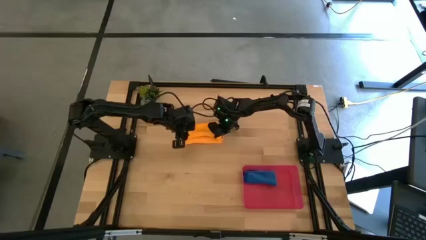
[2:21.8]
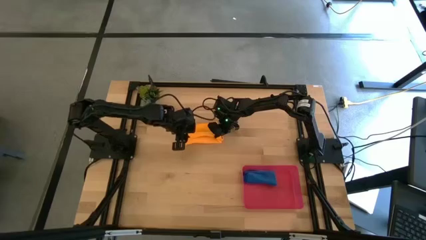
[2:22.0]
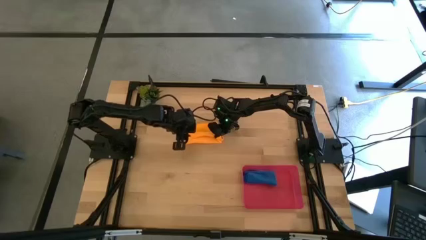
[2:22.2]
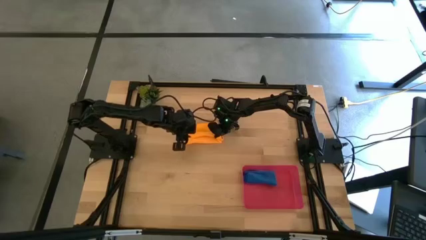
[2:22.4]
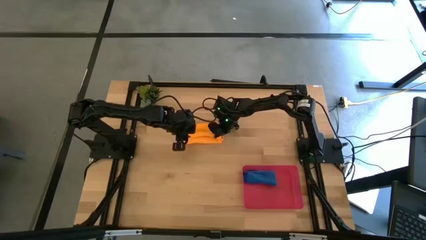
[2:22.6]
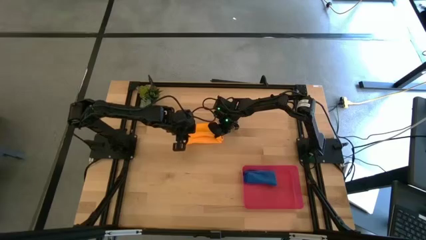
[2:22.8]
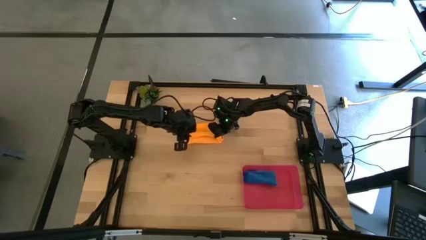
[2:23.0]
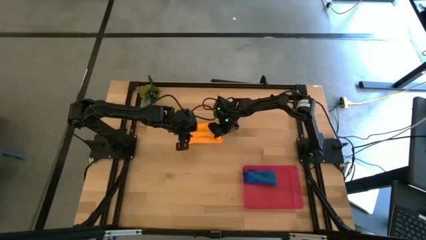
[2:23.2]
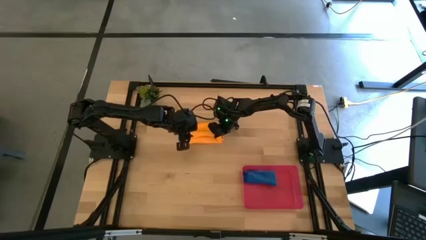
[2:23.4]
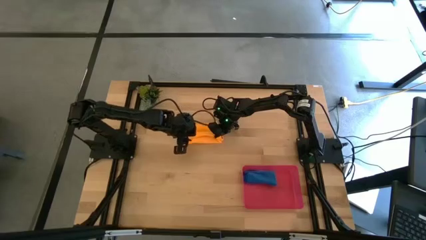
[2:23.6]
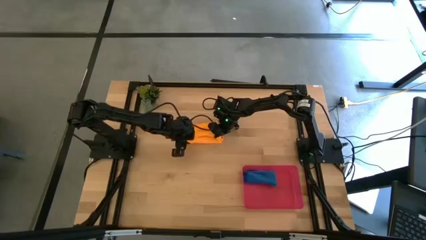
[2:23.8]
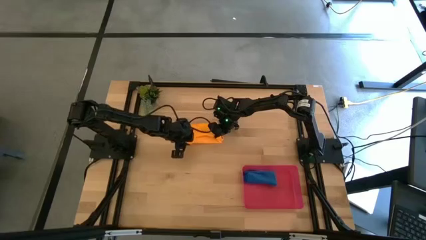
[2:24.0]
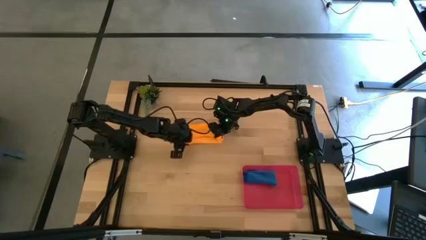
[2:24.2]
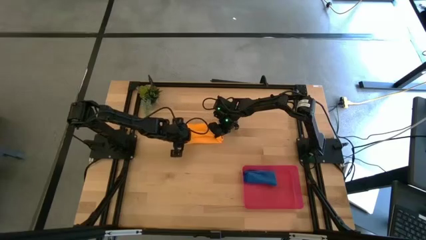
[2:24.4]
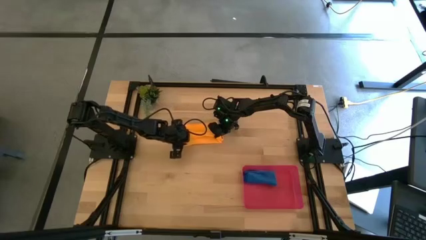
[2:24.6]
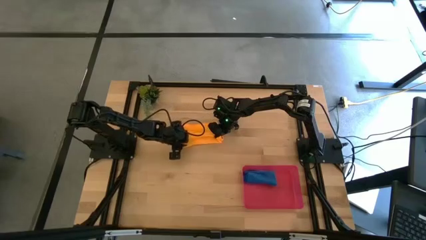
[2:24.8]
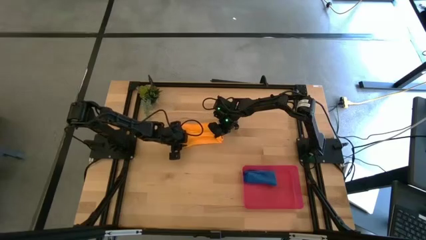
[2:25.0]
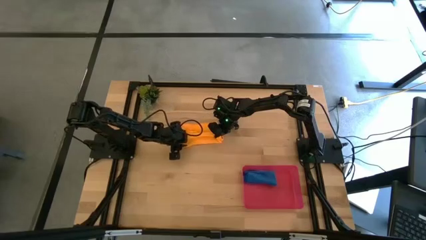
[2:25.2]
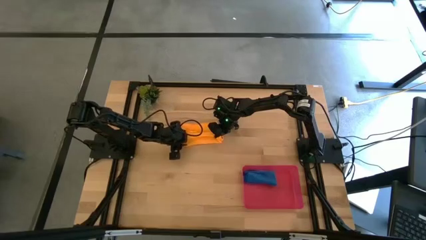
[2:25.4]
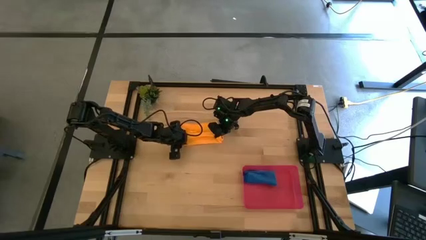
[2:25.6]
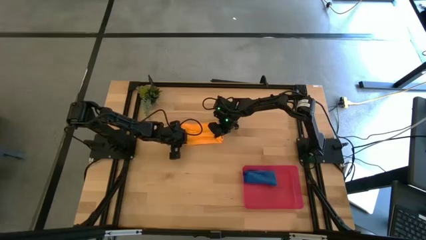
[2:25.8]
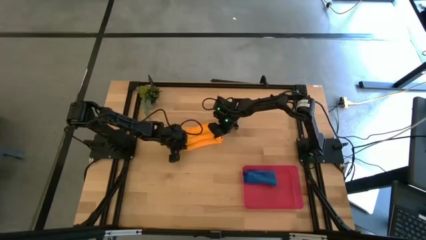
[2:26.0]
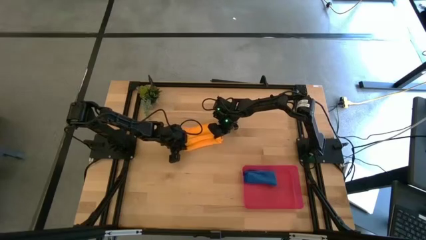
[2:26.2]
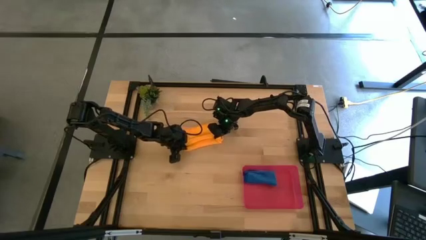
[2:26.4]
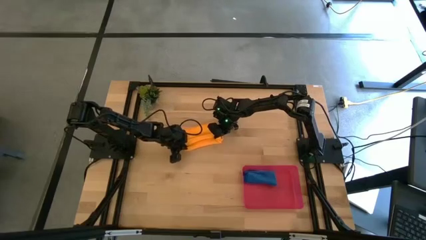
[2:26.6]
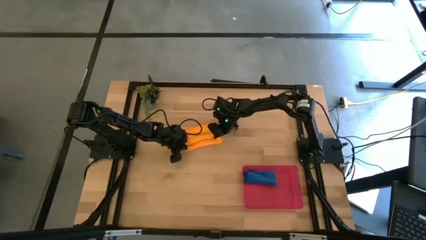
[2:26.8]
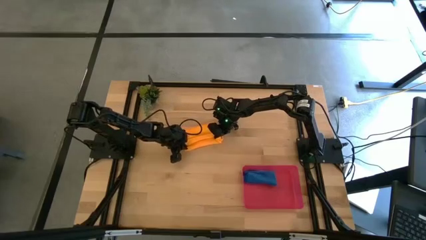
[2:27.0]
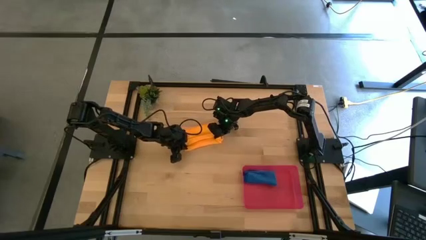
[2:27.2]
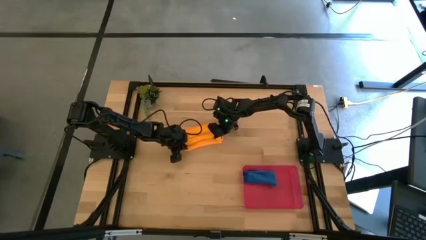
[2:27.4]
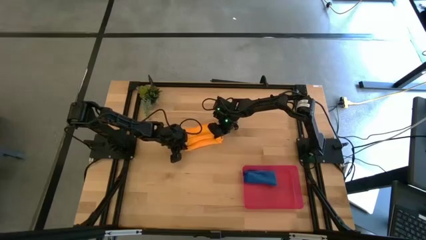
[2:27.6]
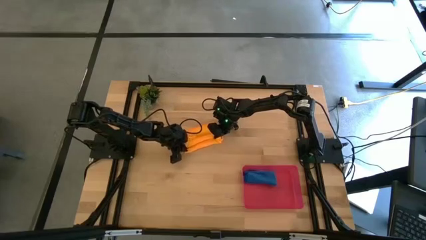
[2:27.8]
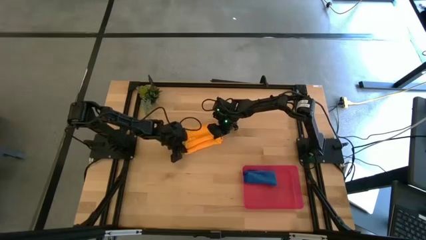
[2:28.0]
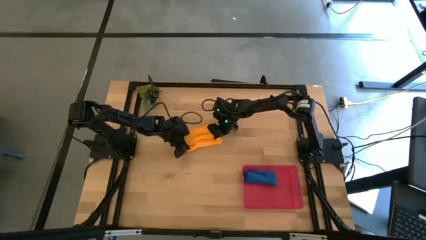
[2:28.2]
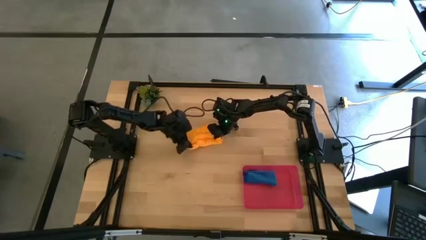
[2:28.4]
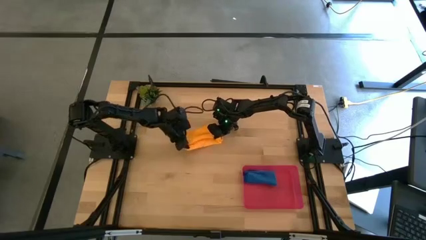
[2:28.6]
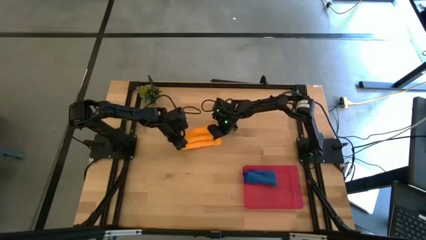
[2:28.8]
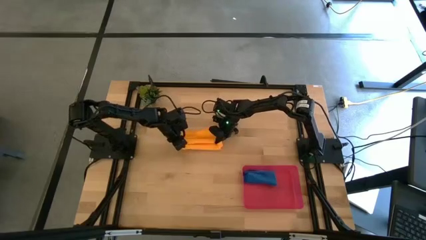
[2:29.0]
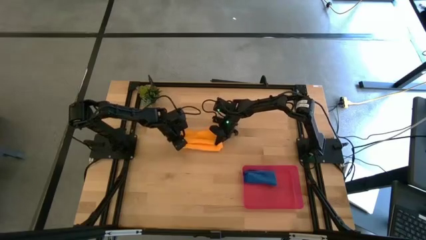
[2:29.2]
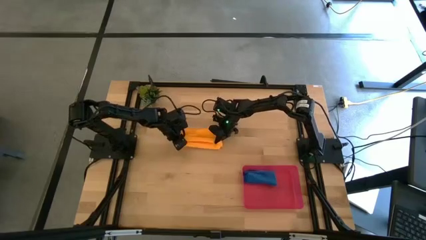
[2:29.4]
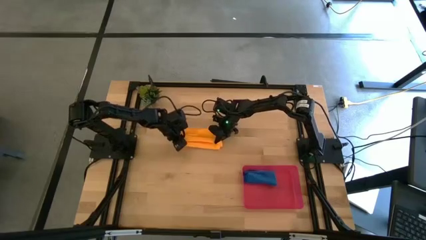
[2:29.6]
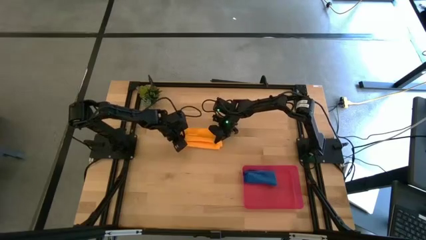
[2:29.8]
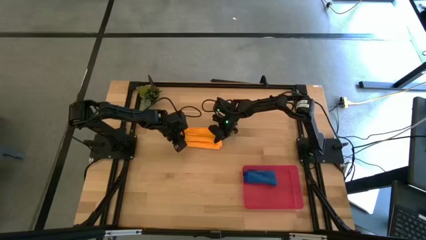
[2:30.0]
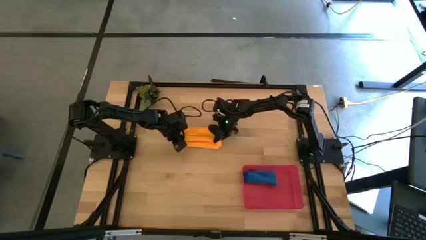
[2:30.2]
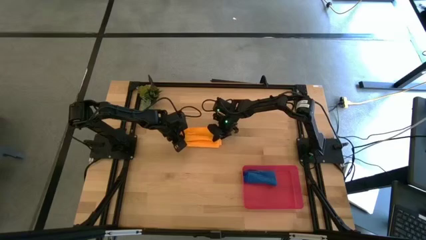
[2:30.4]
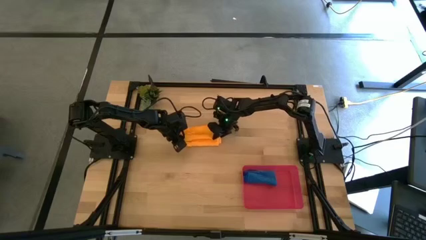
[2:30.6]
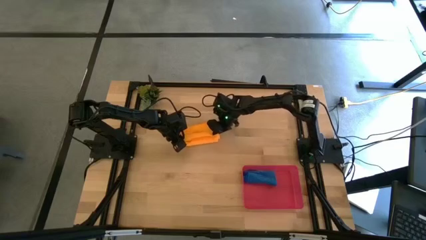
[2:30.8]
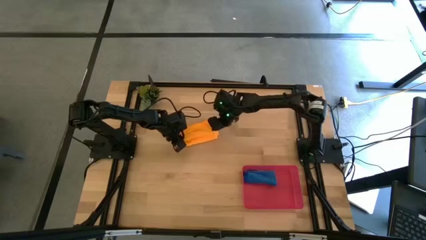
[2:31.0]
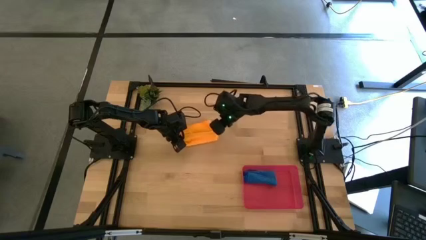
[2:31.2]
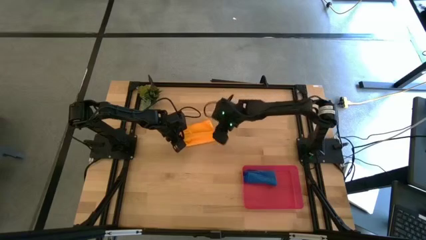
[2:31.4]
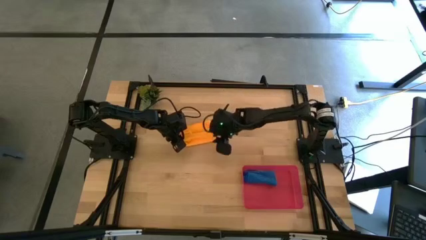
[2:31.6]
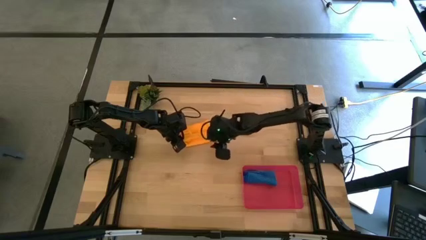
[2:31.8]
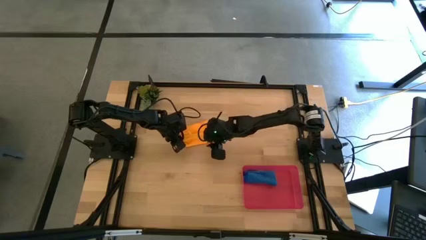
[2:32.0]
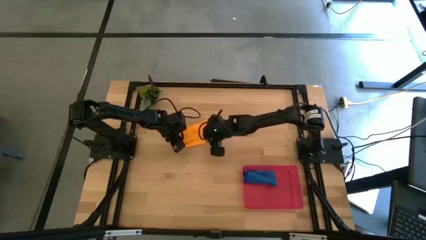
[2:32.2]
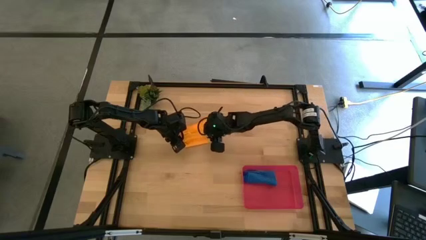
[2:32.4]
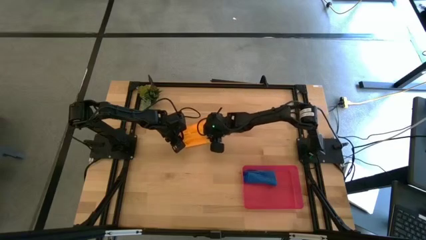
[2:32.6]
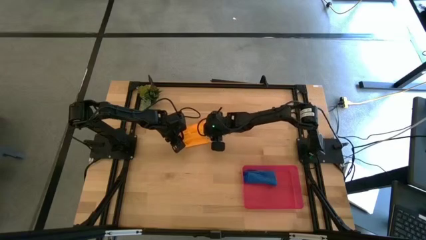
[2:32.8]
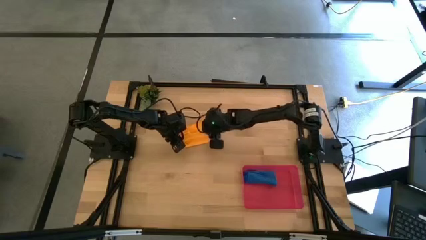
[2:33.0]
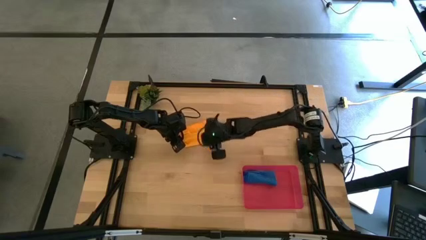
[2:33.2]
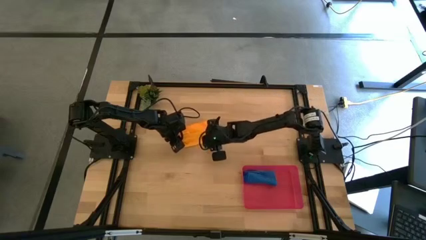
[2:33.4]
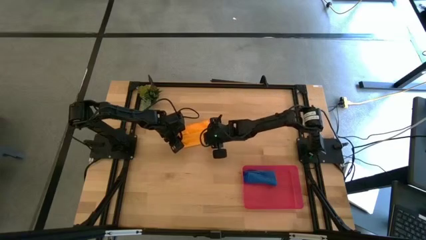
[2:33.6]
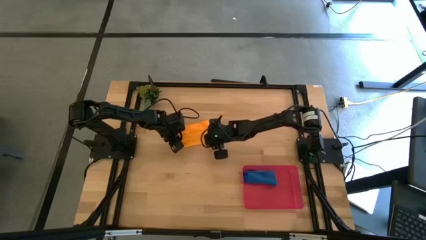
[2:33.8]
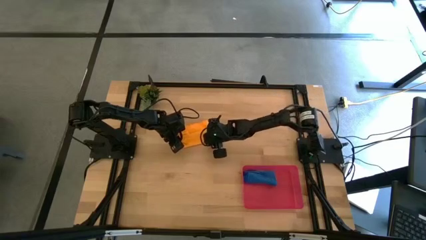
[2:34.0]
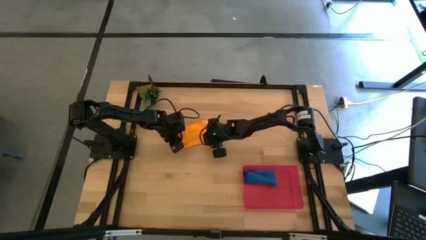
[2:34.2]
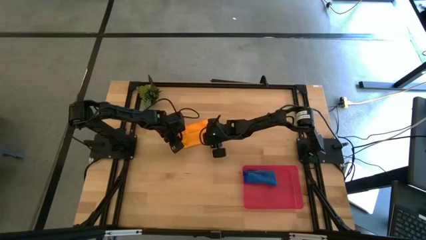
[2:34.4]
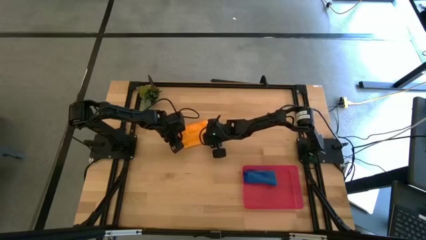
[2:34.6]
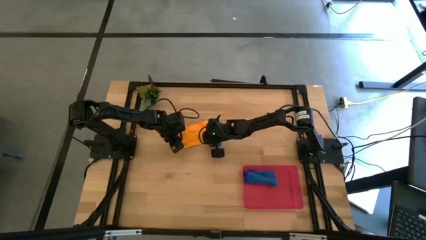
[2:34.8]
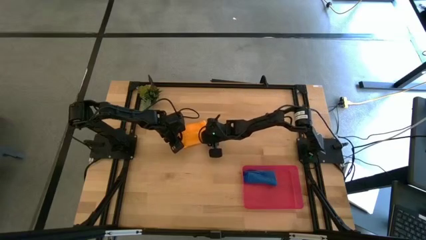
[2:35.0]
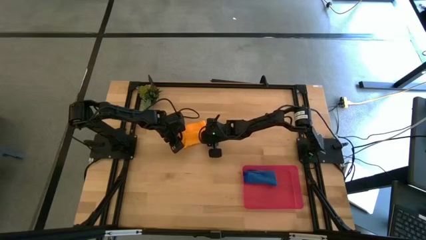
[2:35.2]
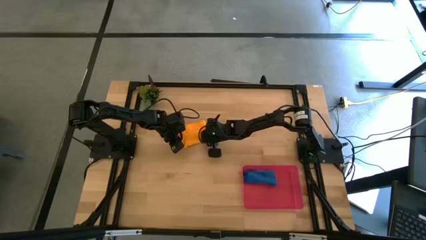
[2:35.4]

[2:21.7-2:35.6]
Task: Roll microfiber towels into tight, uniform cylinder then place into a basket
Roll the orange microfiber towel

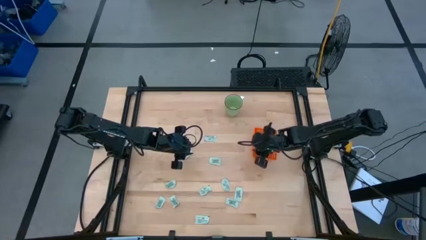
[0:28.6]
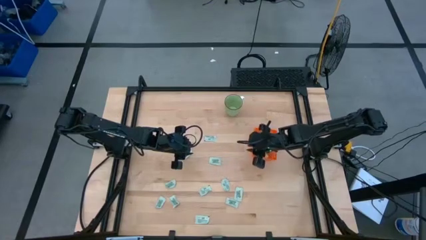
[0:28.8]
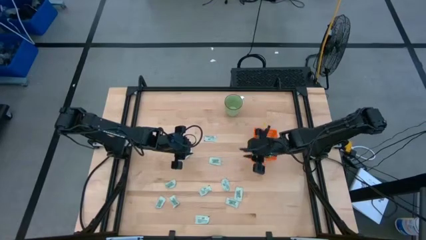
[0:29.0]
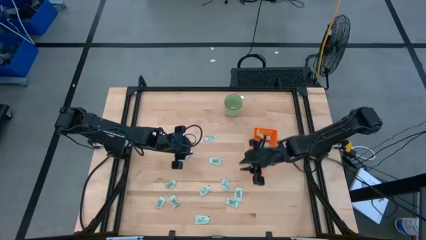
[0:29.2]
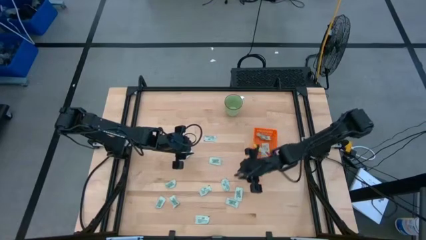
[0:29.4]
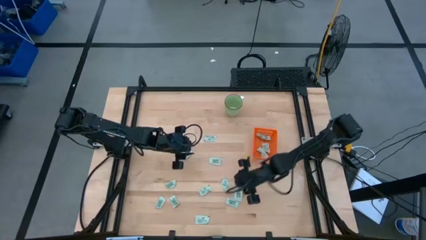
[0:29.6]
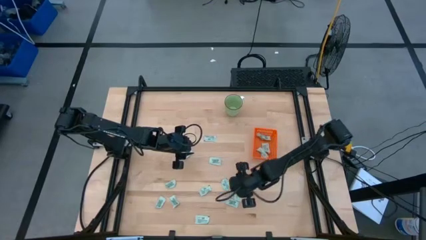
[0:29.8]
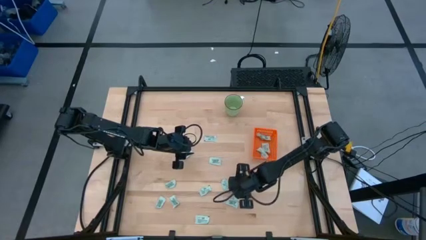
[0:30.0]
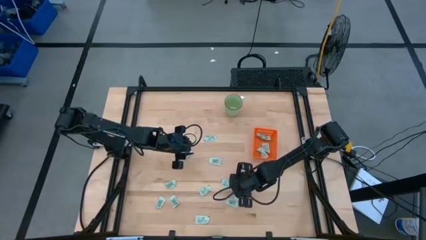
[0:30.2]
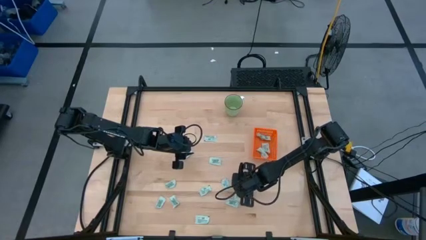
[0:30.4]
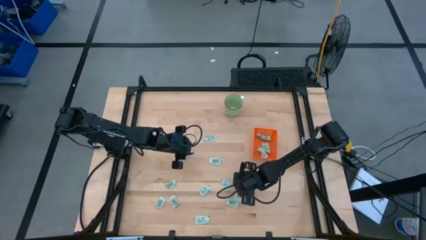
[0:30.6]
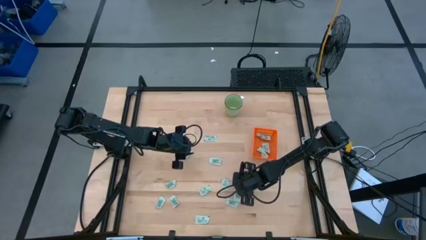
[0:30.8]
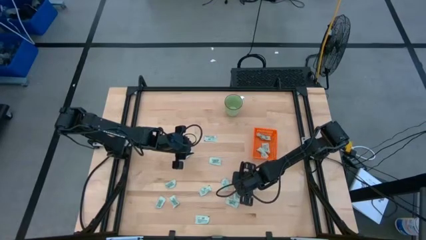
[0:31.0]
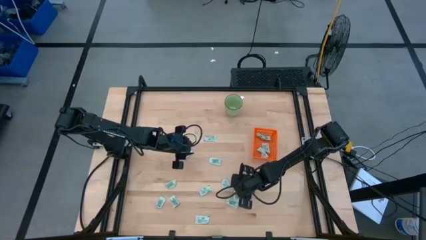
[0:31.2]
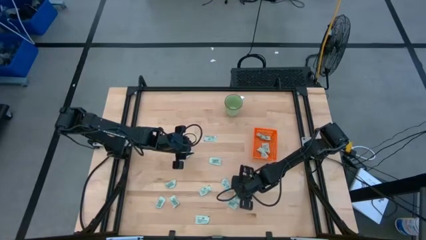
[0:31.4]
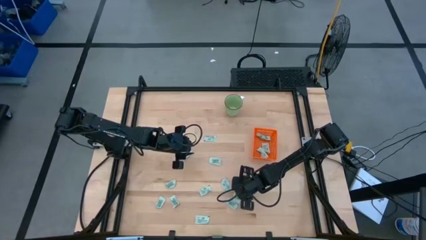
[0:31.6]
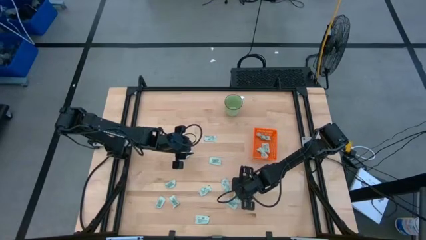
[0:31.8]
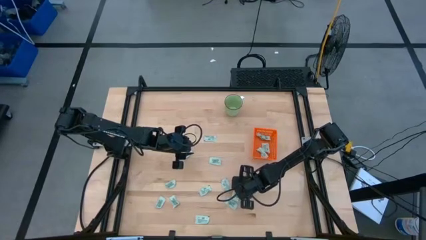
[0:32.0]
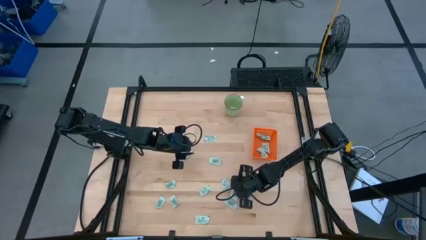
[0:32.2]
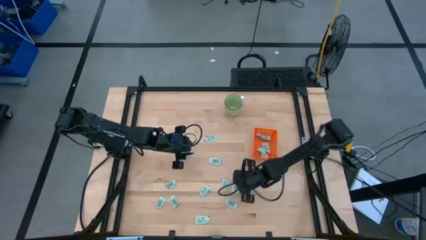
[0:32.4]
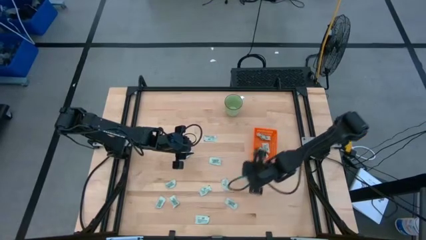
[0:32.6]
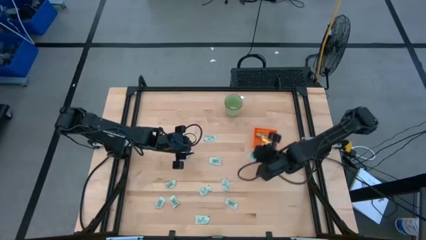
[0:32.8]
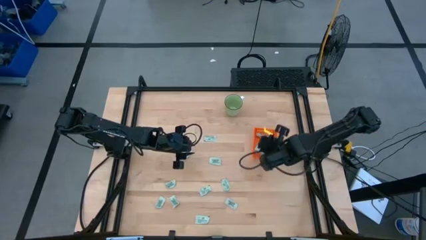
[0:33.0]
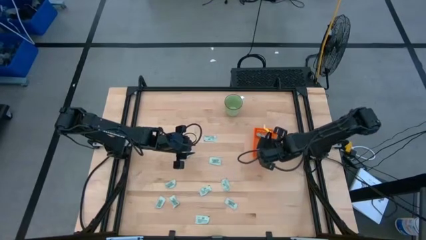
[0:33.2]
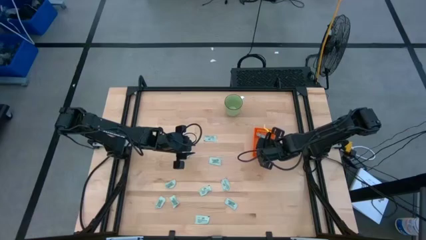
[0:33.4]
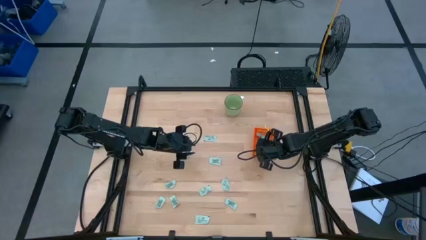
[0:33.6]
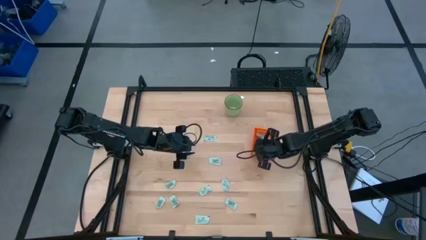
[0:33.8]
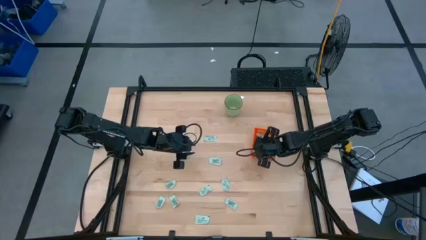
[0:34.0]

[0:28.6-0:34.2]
Task: Pick and place Stevia / Truvia into bins
Put the light green packet into the orange basket
